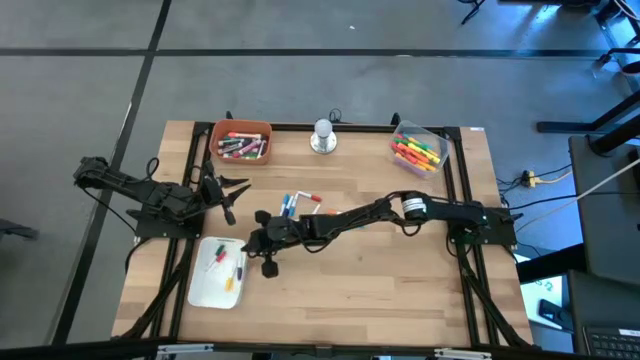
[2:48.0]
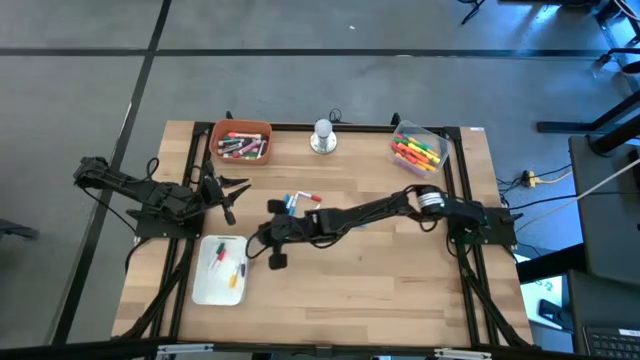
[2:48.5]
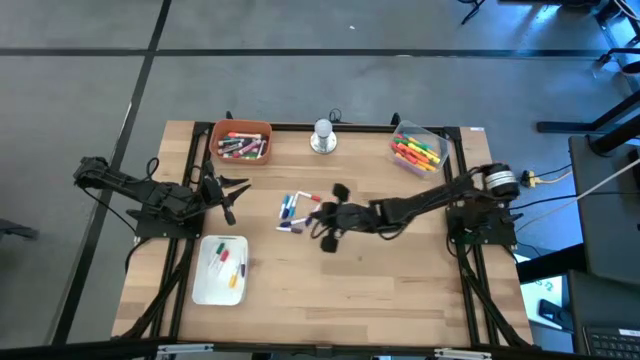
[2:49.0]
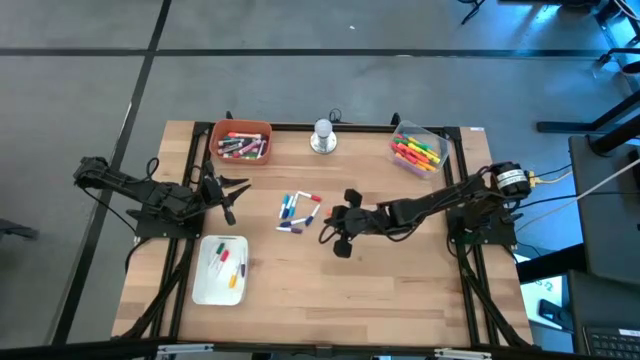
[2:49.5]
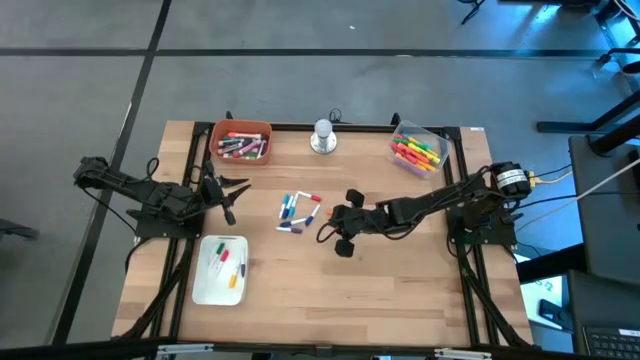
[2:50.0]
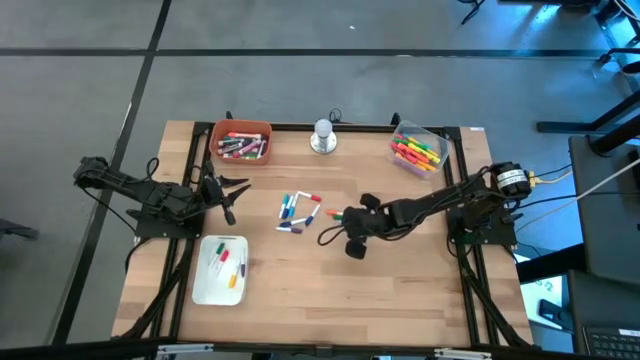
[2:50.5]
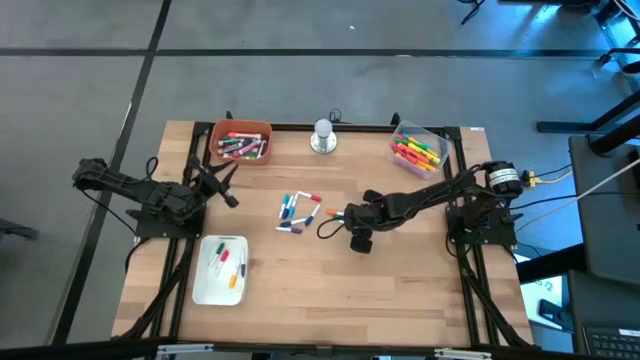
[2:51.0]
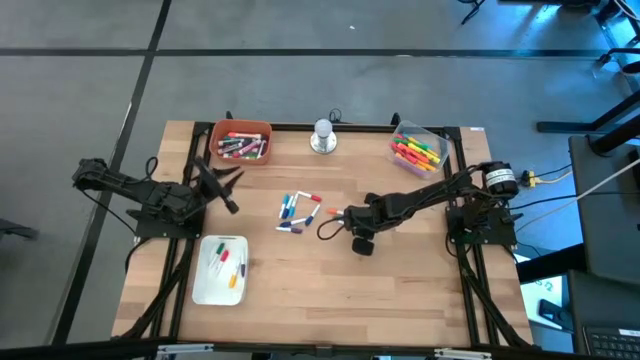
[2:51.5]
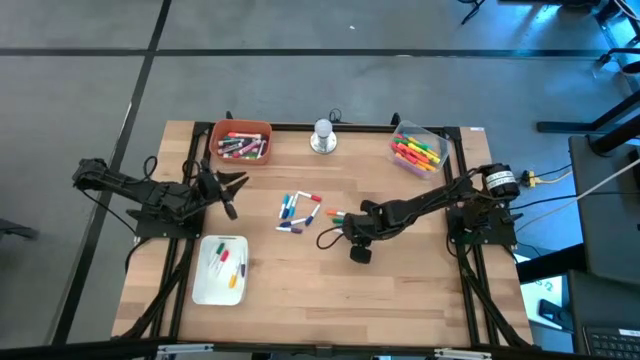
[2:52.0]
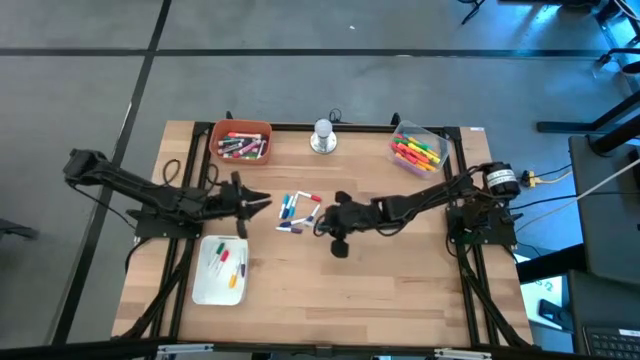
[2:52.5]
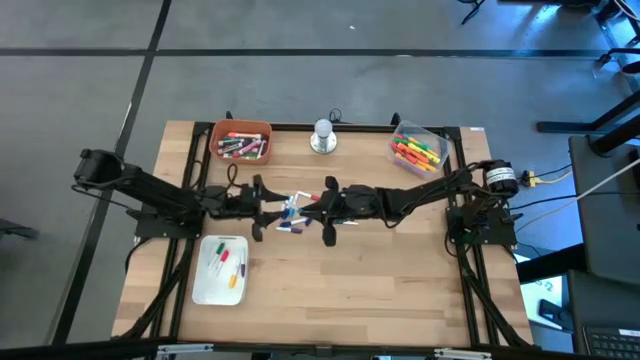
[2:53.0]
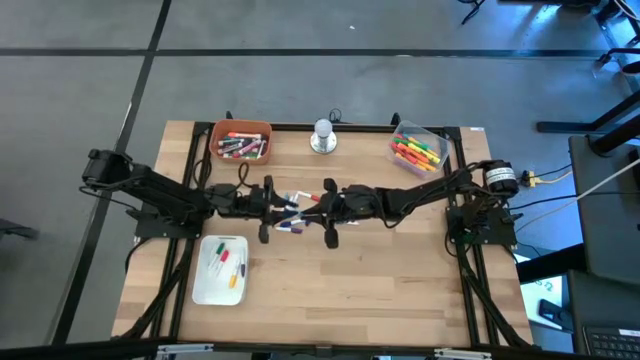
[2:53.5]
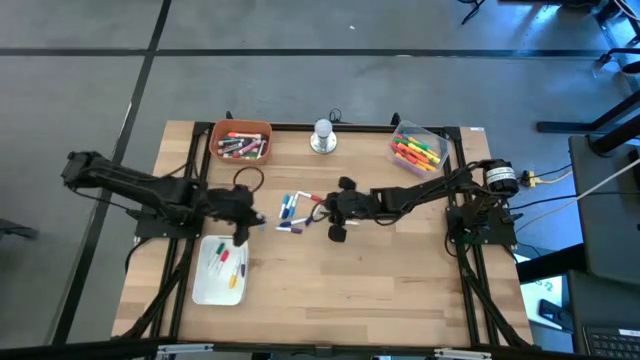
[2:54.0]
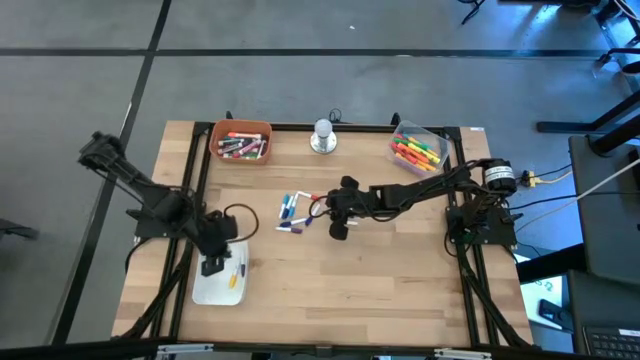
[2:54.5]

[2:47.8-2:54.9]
Task: Pick & Place Markers
Put the small light blue highlighter pen into the white bin

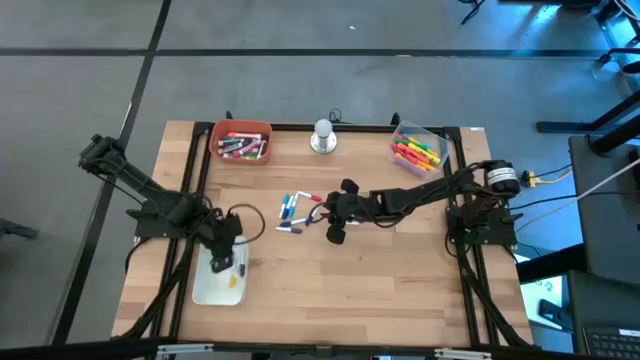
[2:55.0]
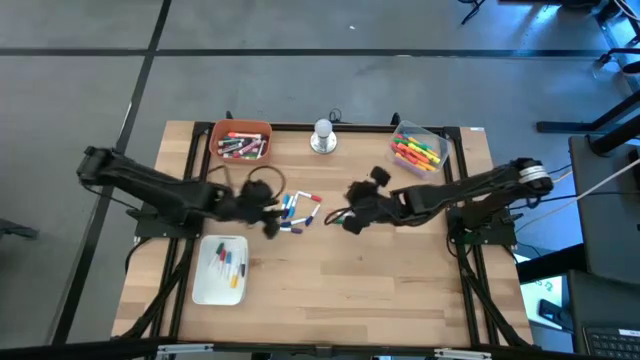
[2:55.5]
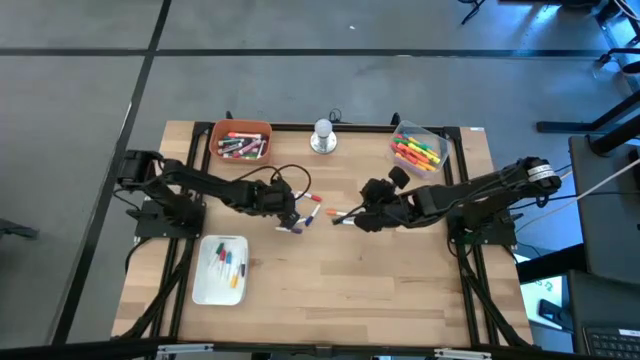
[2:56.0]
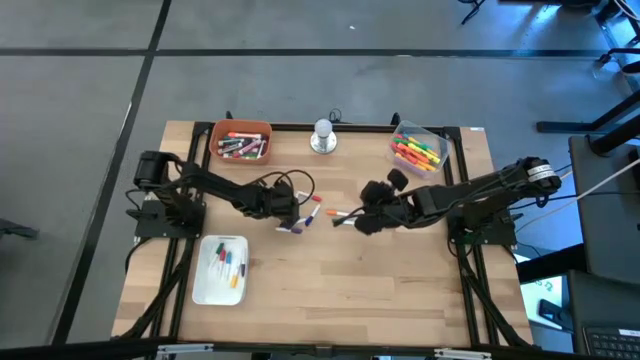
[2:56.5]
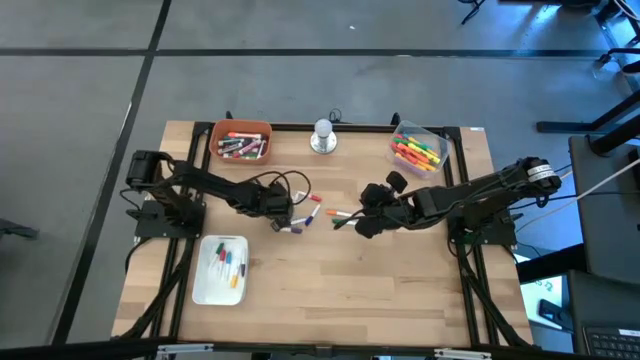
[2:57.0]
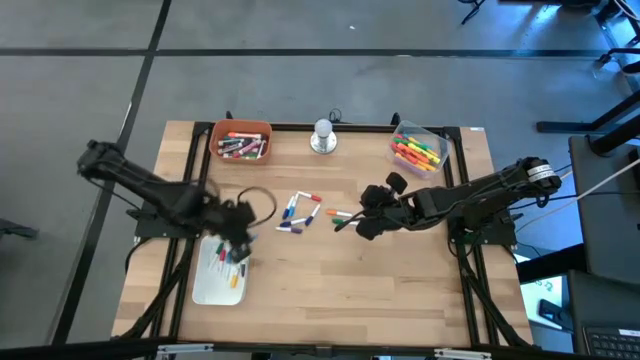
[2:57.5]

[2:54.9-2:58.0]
Put the small light blue highlighter pen into the white bin

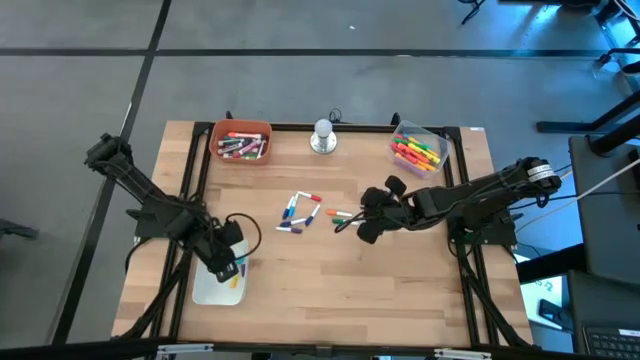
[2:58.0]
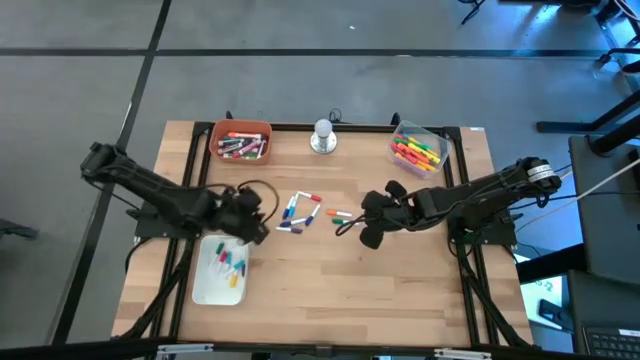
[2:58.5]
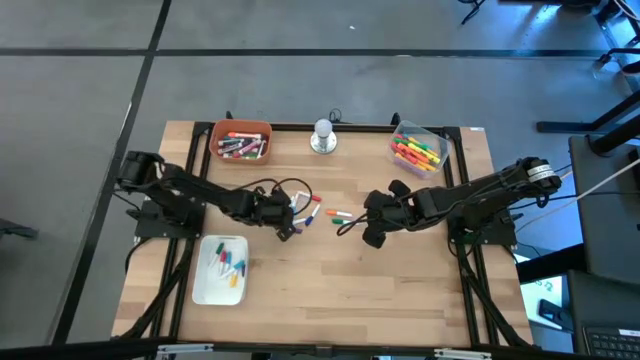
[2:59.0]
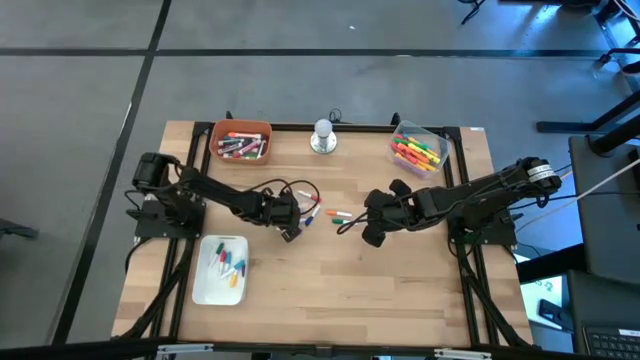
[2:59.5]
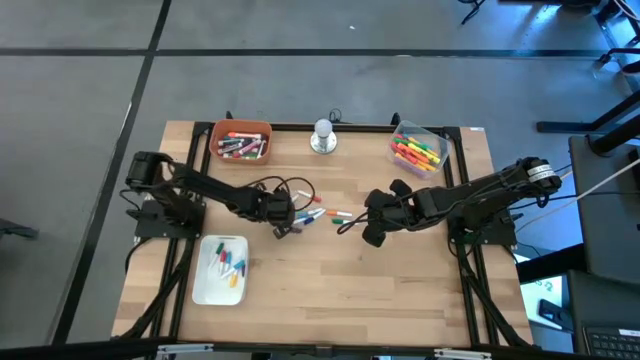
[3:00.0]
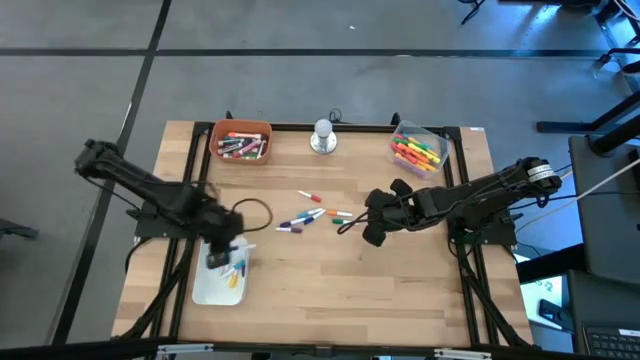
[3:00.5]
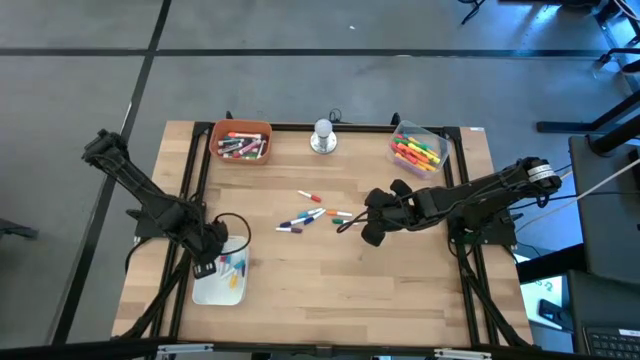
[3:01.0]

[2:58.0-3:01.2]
Put the small blue highlighter pen into the white bin

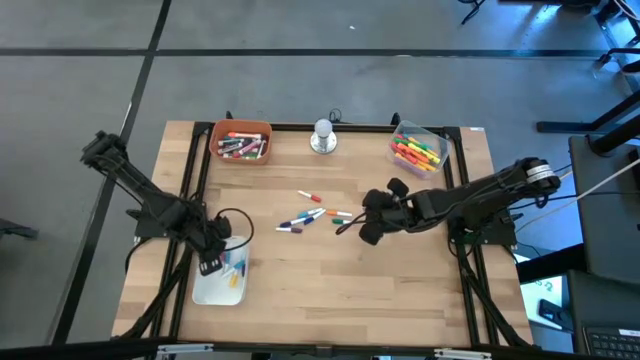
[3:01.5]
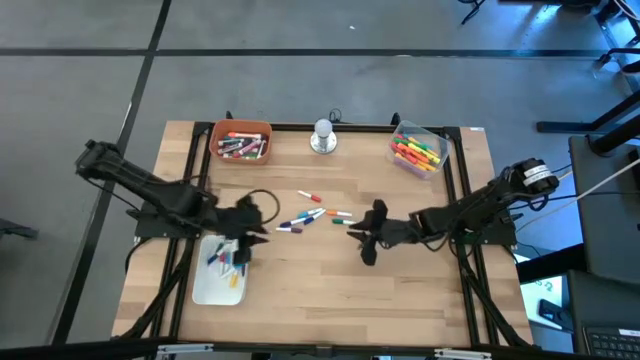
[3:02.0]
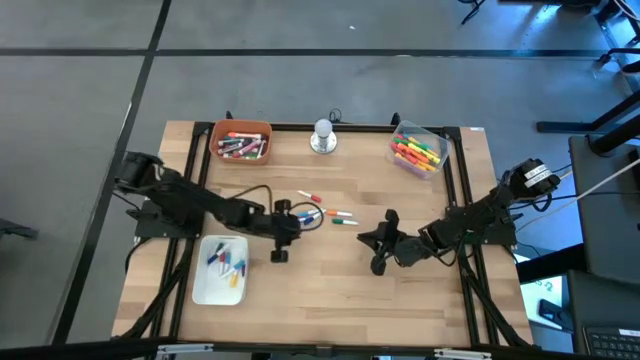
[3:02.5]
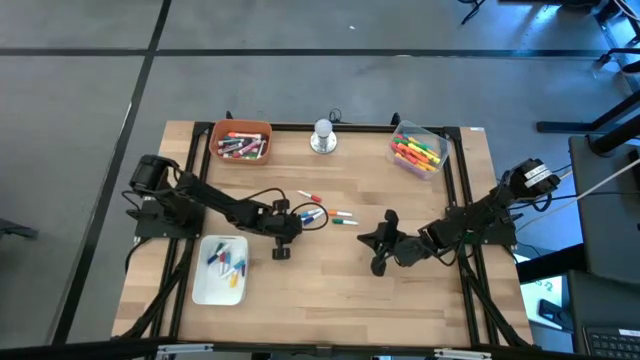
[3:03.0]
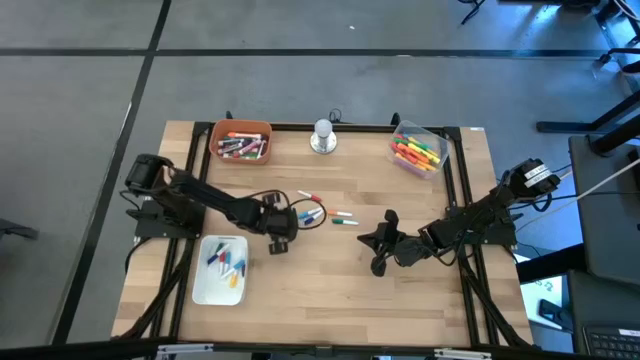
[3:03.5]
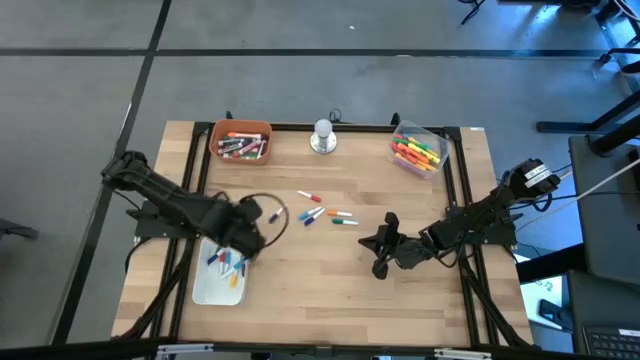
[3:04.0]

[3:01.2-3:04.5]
Put the small purple highlighter pen into the white bin

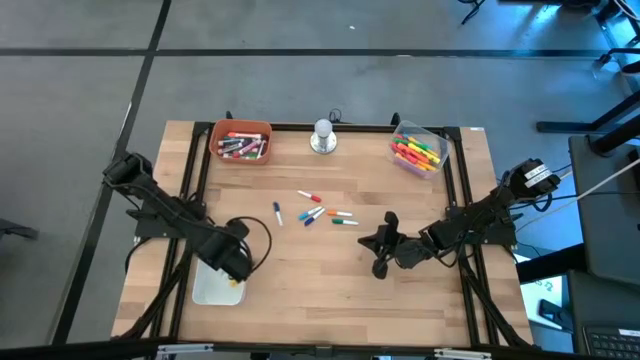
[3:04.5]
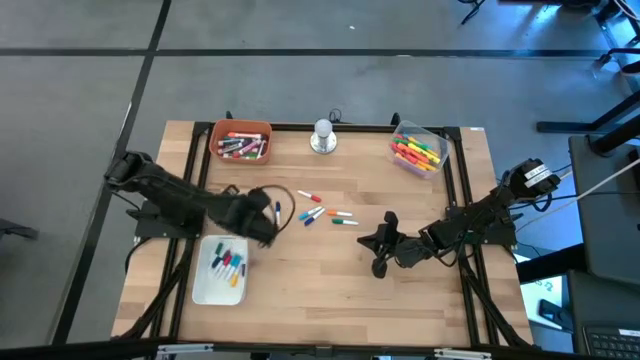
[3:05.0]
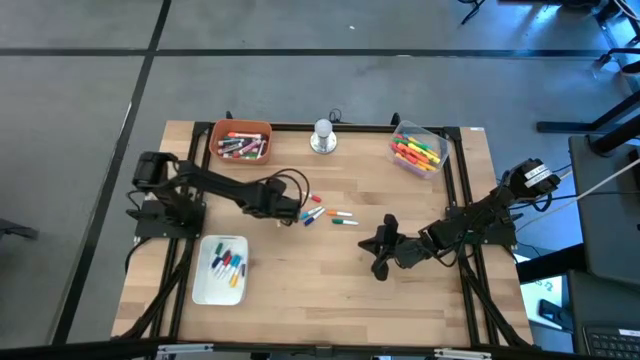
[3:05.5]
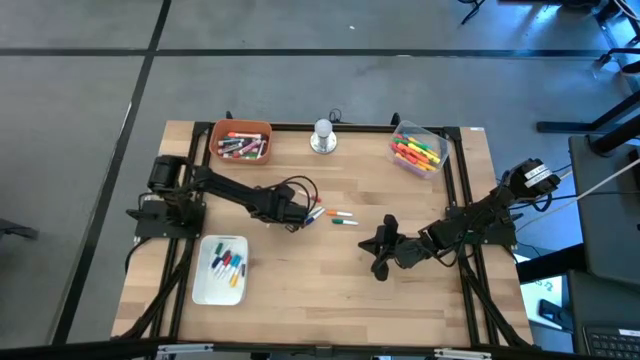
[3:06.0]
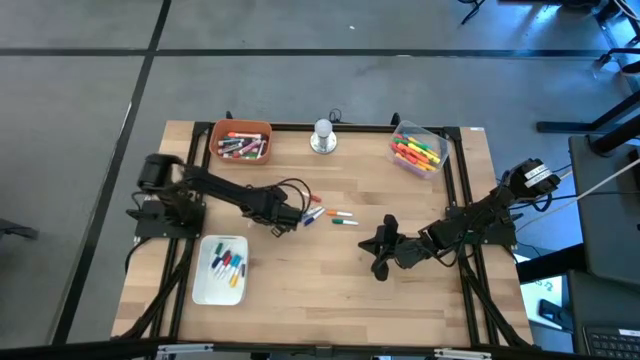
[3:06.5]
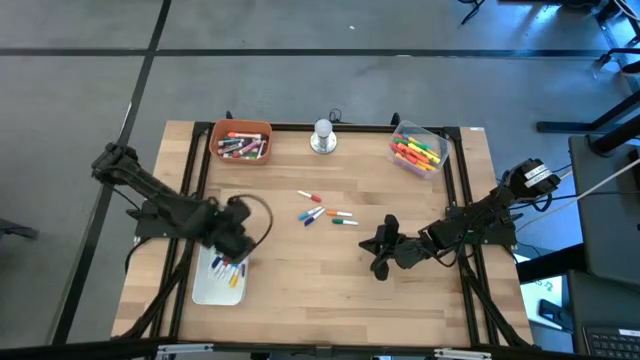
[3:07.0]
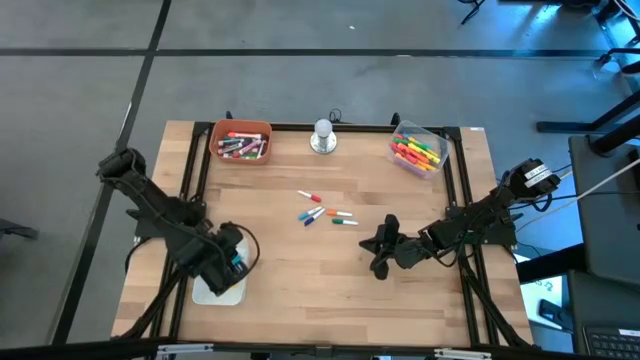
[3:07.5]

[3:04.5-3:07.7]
Put the small blue highlighter pen into the white bin

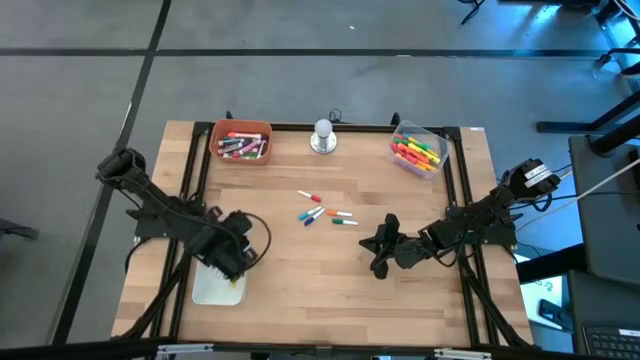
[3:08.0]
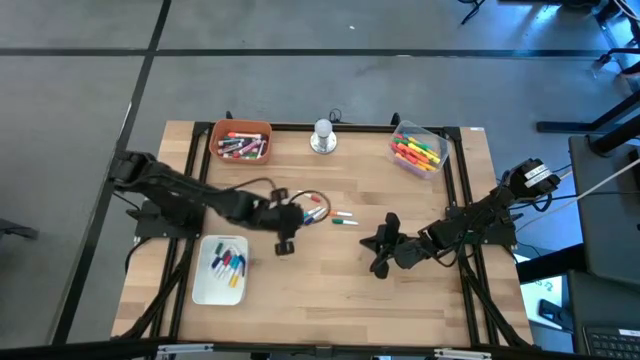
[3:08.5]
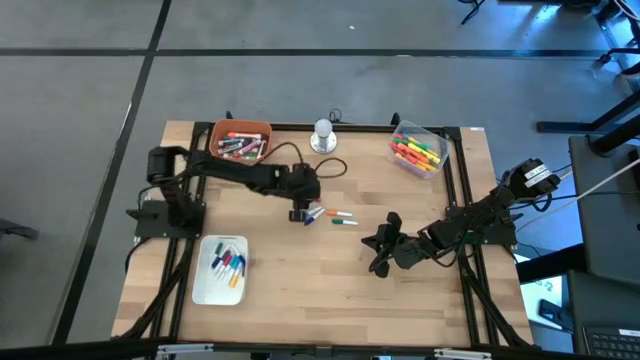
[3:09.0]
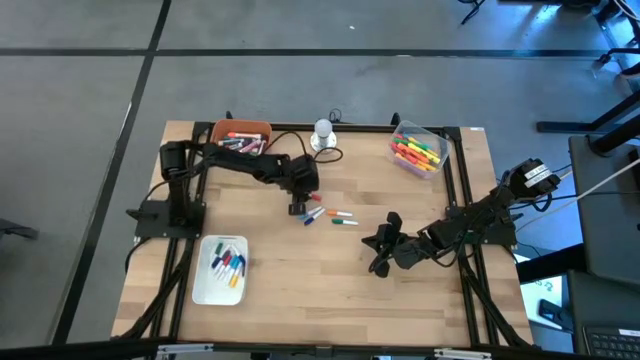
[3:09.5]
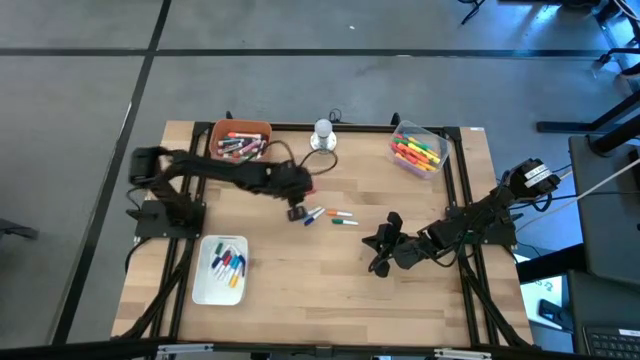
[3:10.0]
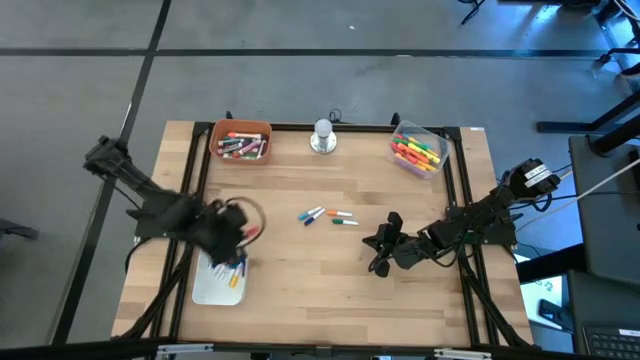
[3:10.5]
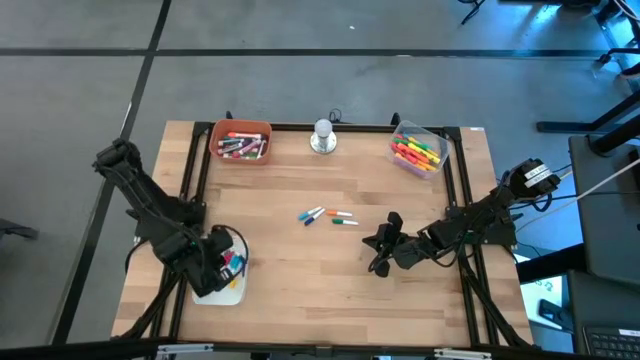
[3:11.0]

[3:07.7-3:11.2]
Put the small red highlighter pen into the white bin
